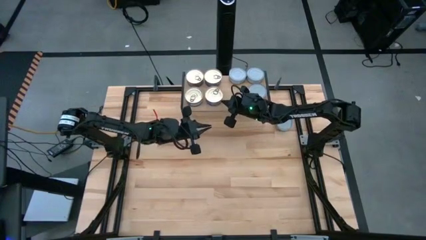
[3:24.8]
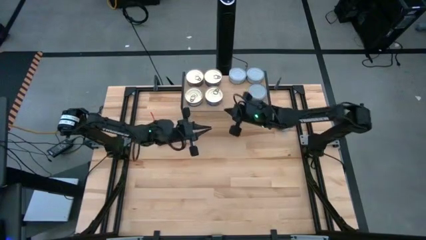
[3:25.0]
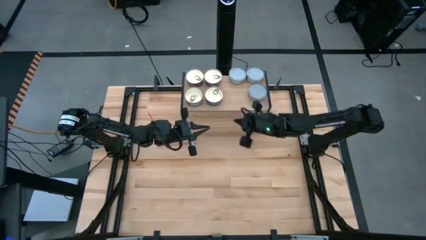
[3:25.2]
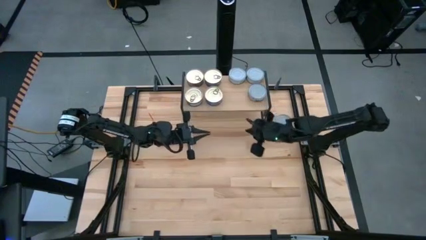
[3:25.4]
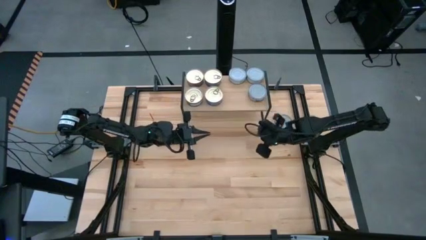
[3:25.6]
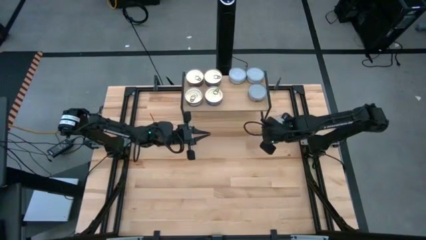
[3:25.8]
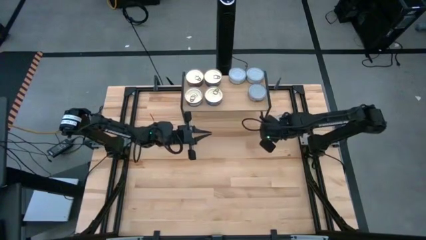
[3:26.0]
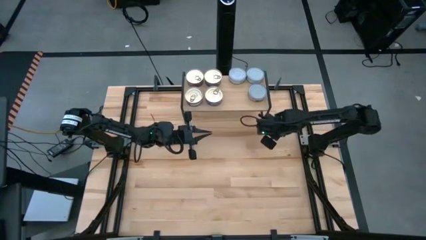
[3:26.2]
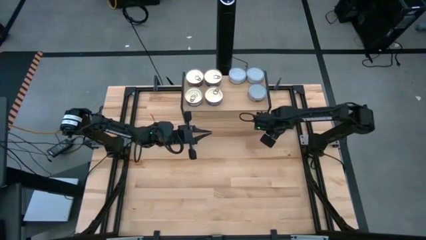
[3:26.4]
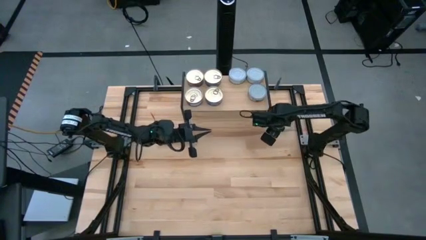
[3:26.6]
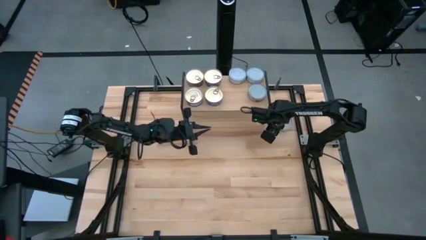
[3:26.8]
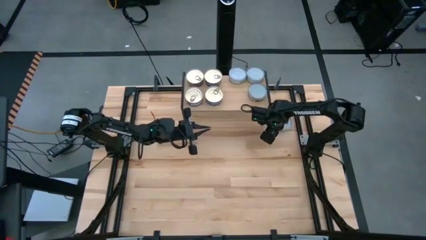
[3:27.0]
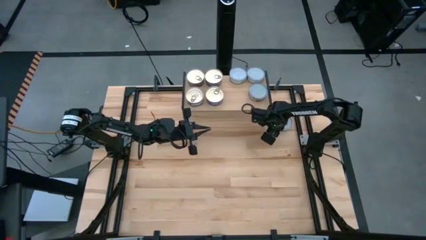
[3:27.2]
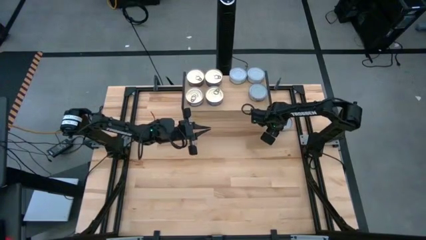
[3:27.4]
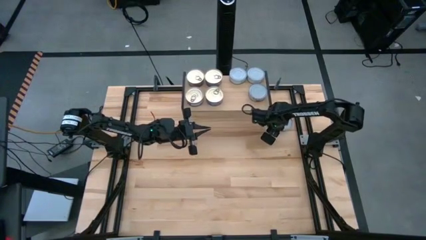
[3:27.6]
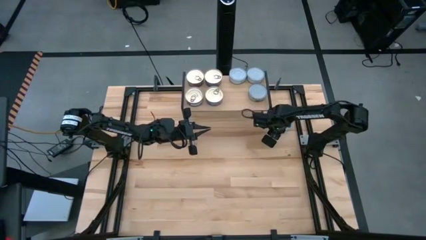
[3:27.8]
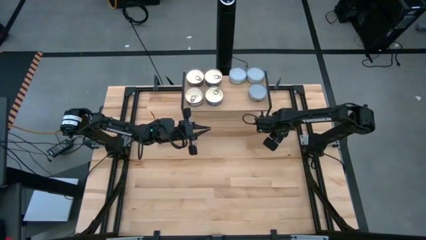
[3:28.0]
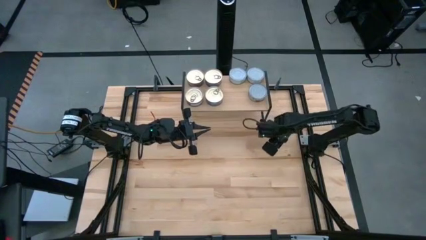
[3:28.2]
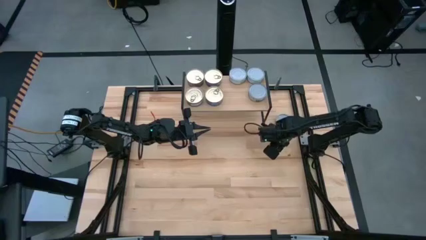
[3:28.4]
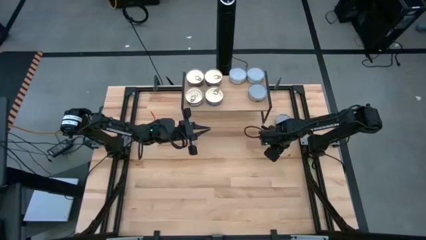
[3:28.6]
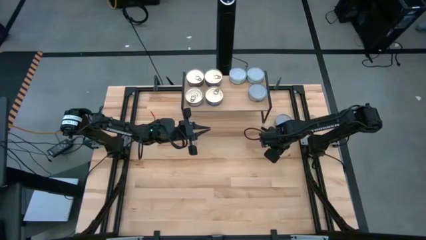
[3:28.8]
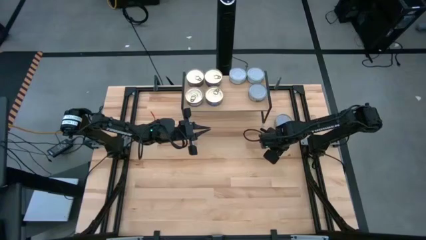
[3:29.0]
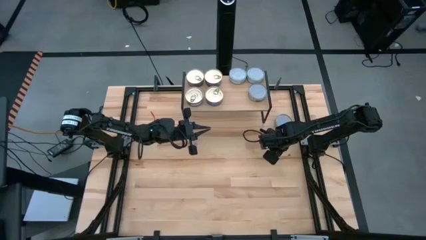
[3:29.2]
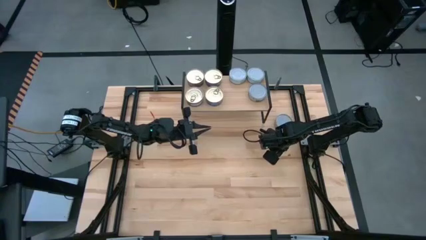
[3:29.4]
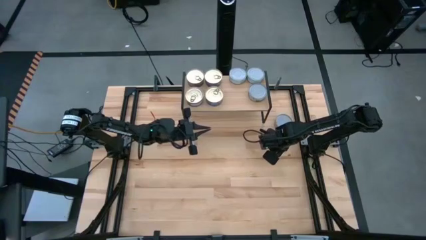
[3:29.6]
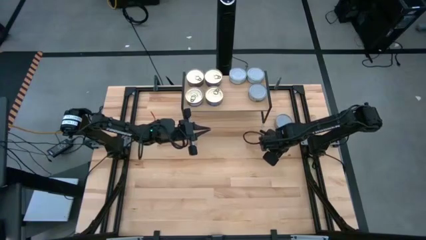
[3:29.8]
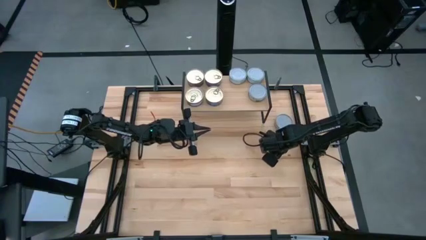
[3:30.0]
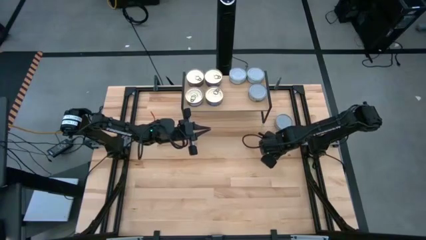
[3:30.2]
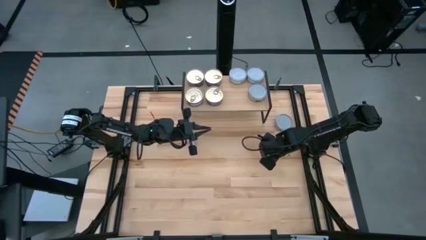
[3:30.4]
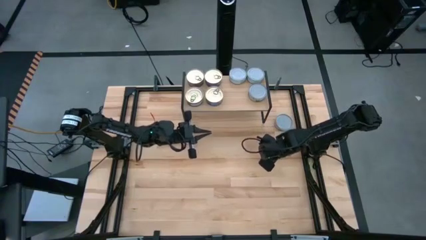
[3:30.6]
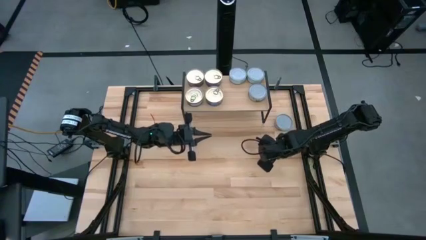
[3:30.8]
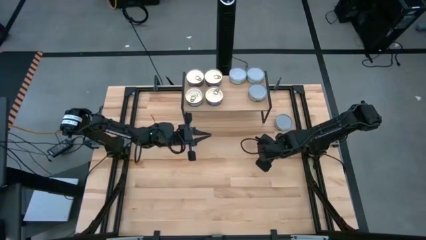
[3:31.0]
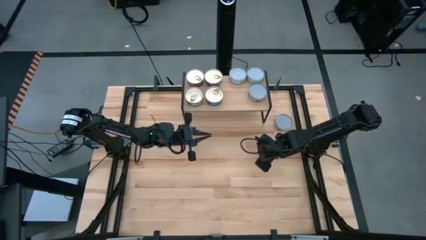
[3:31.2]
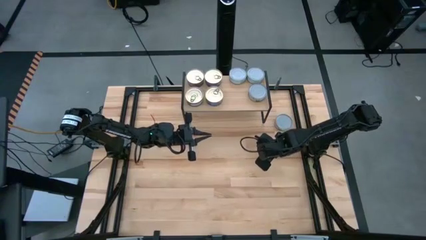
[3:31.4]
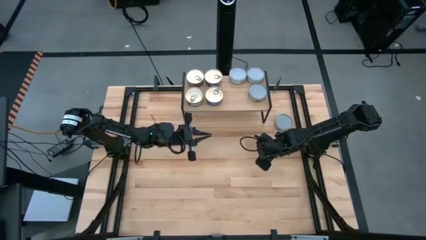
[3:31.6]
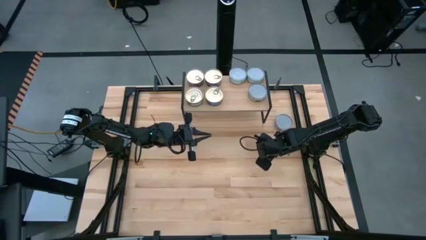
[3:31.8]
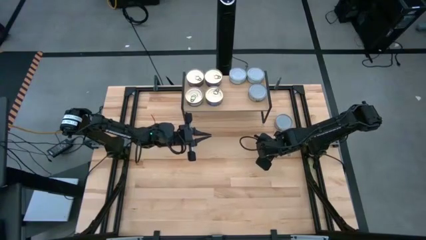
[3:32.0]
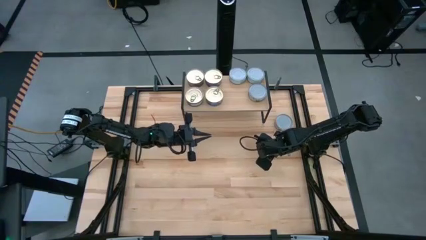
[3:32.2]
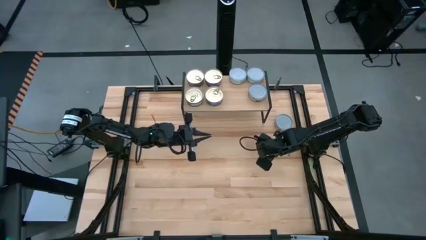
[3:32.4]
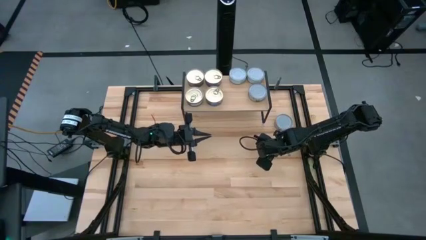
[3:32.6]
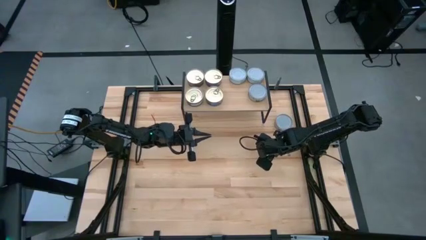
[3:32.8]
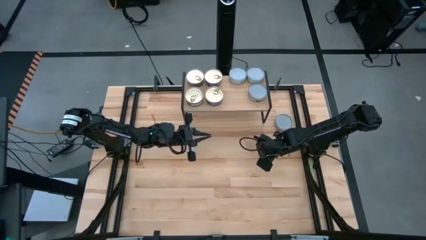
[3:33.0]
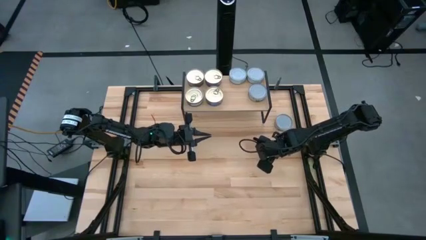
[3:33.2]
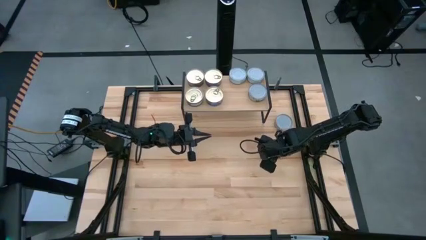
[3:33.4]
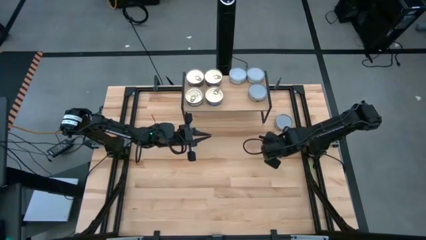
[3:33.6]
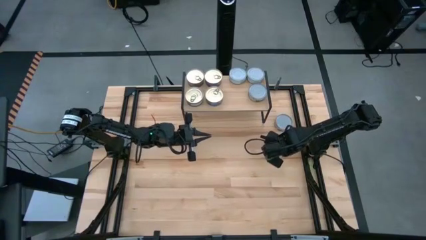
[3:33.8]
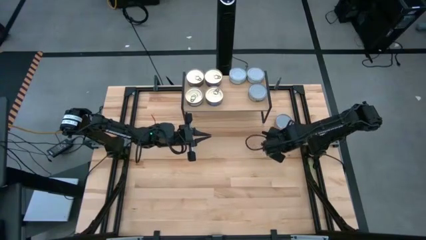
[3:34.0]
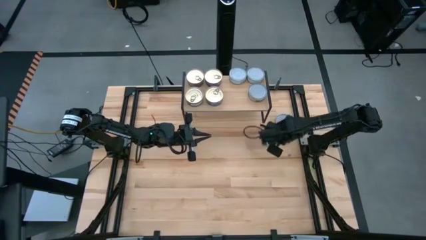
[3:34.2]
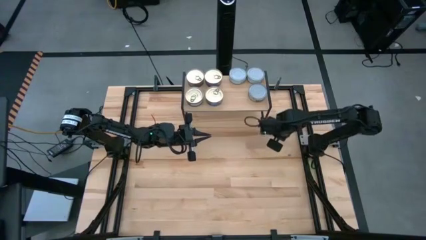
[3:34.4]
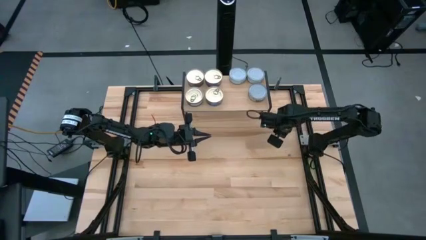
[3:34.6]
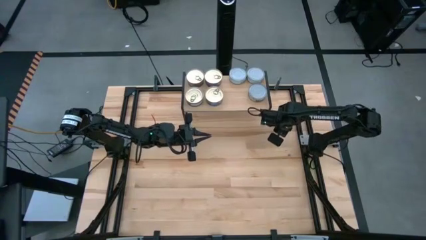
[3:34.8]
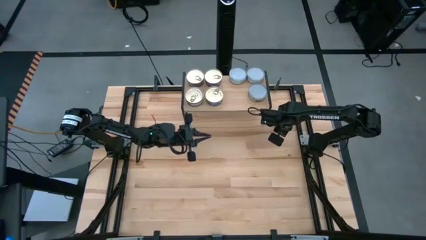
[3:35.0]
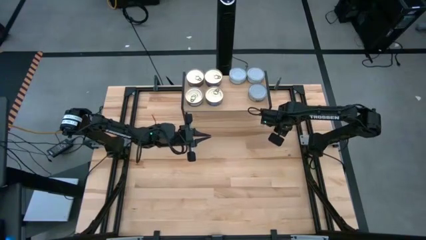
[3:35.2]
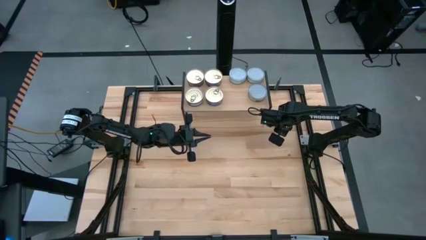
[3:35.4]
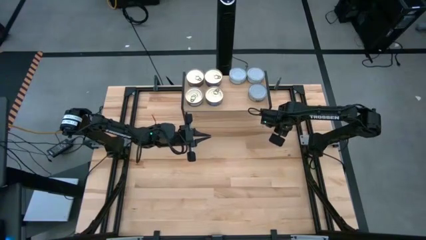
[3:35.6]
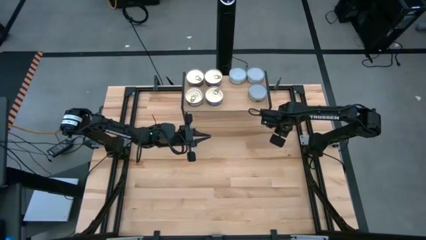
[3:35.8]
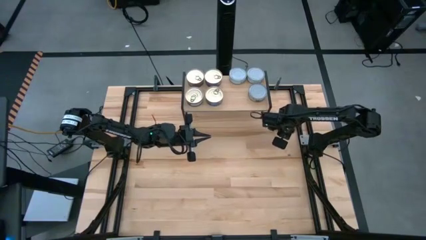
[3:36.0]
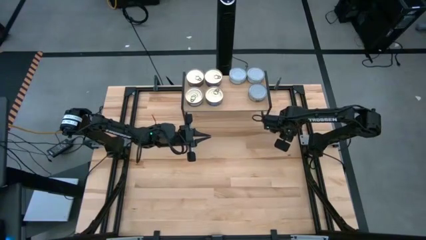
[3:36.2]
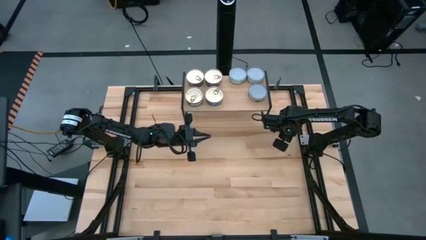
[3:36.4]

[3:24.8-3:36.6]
Task: Stack canned seafood by type on shelf
Put the green tuna can on the shelf aligned with the other green tuna can

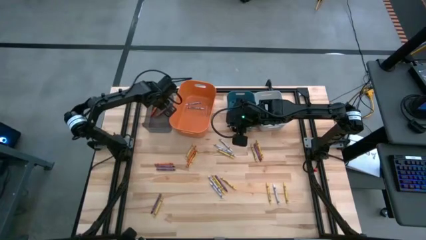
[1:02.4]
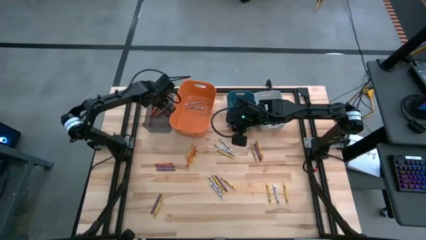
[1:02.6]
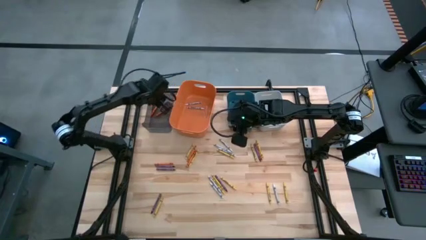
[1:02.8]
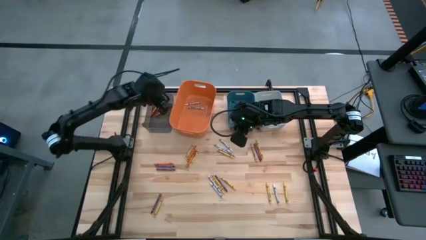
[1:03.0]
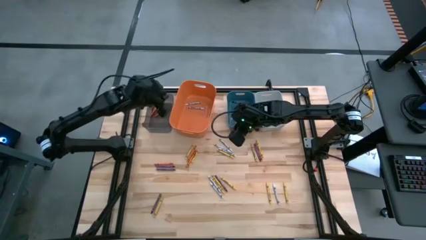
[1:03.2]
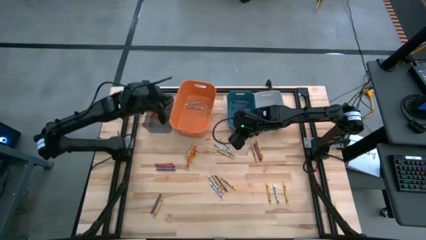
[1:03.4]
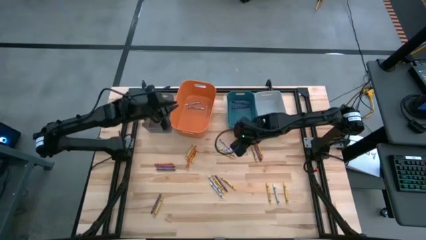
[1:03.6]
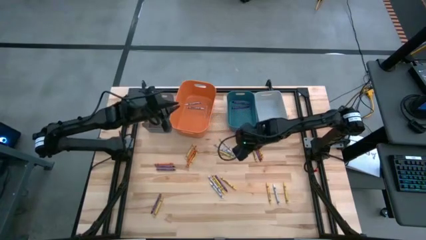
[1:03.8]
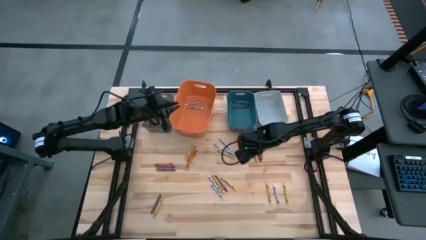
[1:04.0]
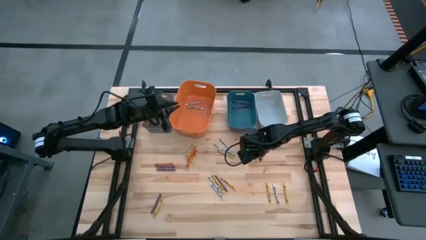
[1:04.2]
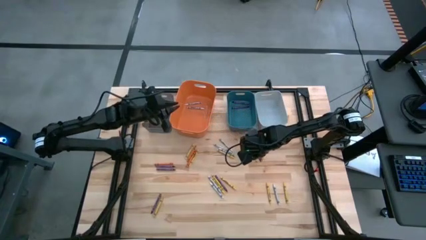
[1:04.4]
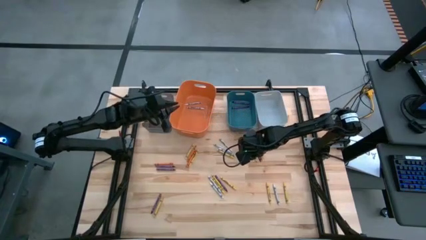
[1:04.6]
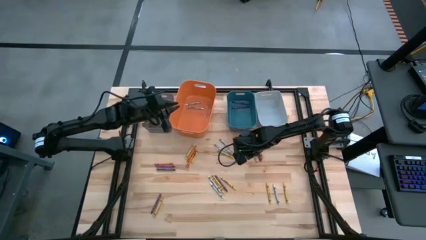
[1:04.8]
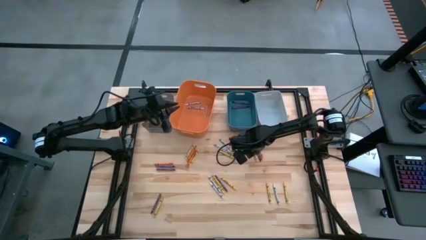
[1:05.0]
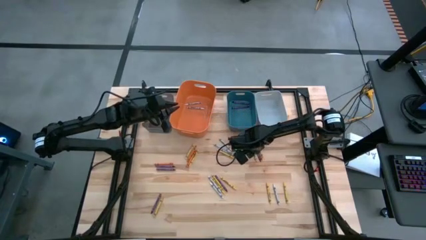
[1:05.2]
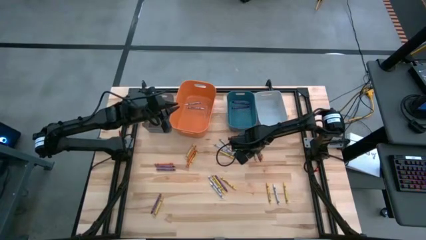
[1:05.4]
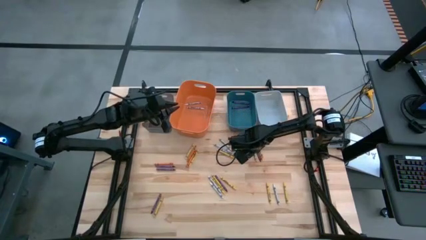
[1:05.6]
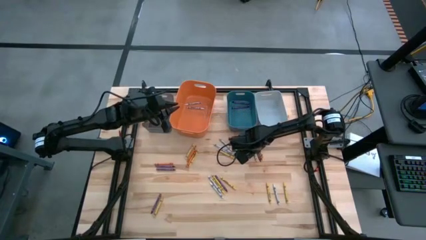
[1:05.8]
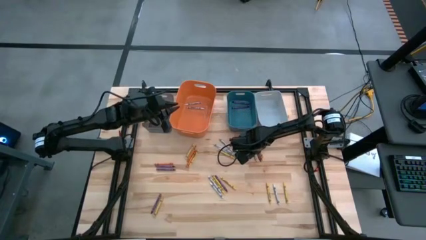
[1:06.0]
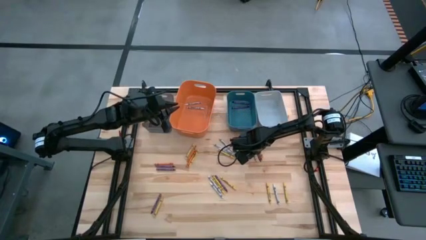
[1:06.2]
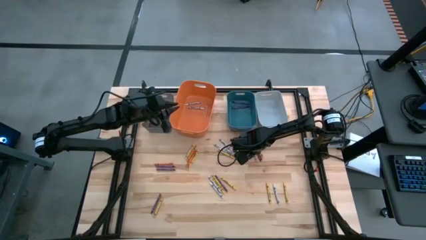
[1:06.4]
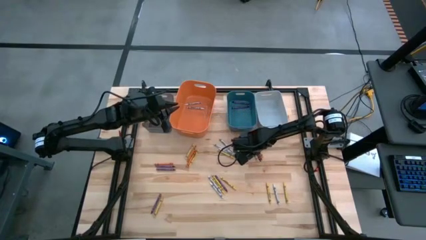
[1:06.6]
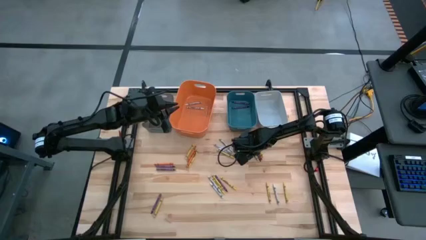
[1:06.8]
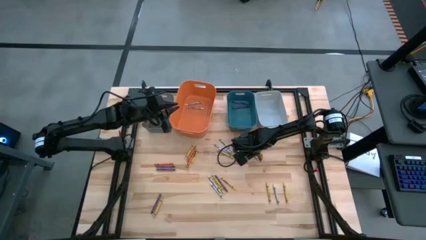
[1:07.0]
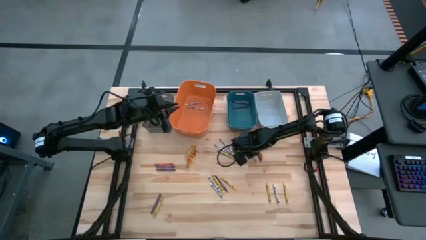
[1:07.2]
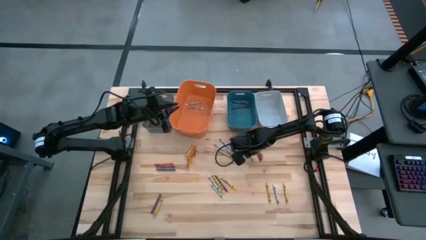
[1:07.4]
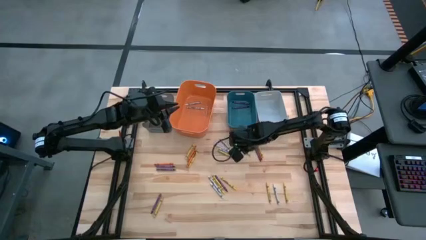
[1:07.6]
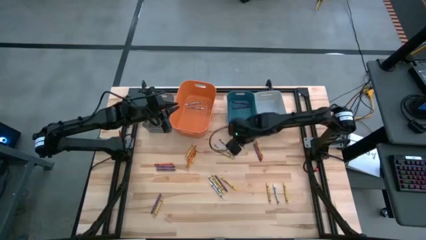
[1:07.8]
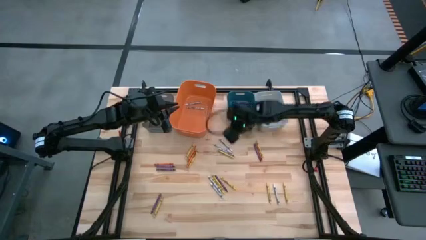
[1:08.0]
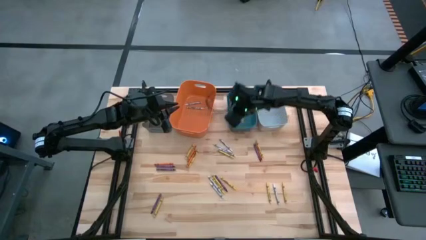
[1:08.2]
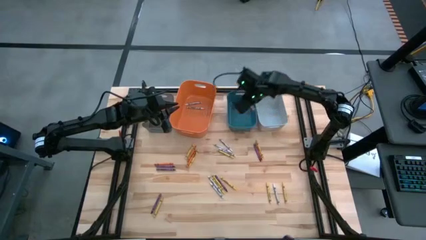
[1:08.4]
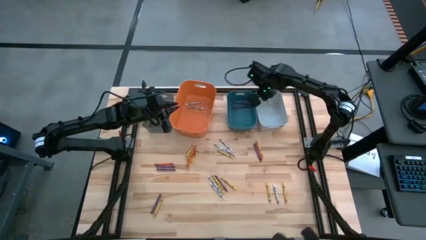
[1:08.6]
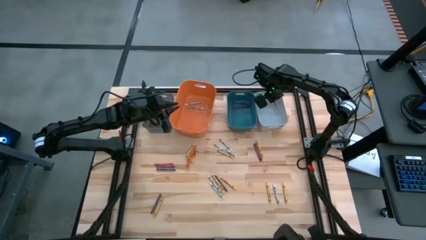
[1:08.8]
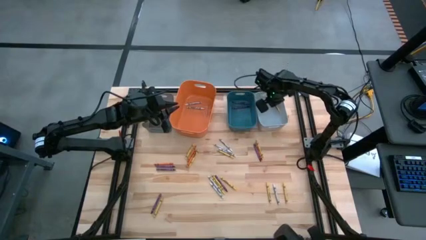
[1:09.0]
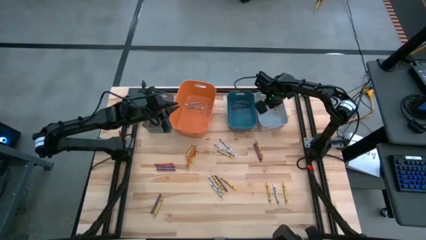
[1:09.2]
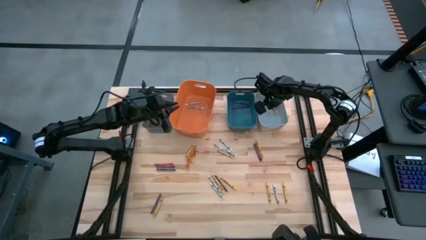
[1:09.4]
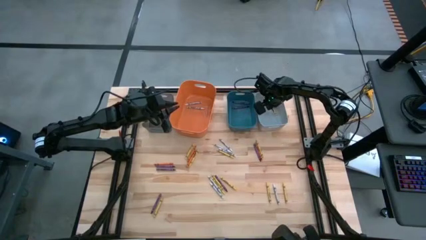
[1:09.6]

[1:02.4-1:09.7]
Task: Sort crayons
Put the yellow crayon into the white bin
